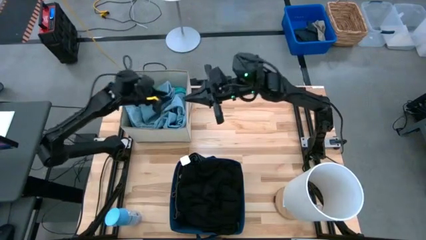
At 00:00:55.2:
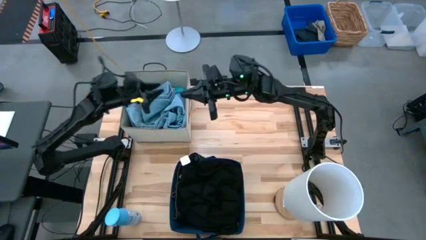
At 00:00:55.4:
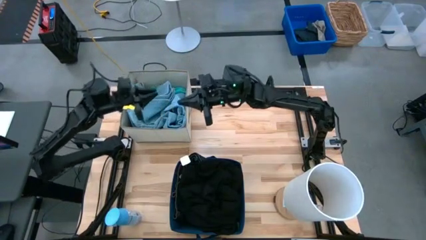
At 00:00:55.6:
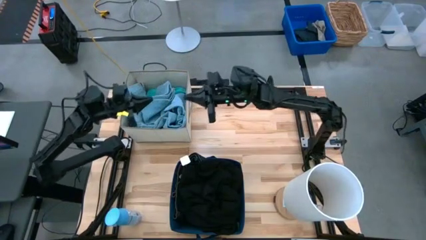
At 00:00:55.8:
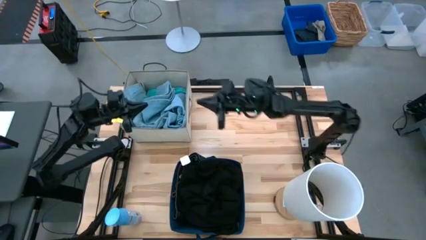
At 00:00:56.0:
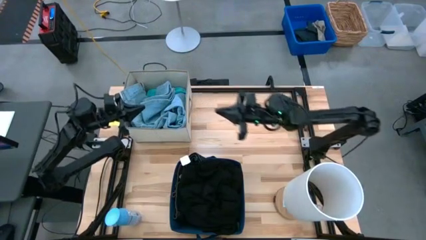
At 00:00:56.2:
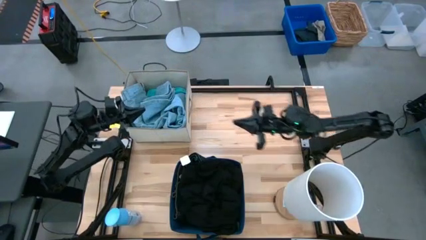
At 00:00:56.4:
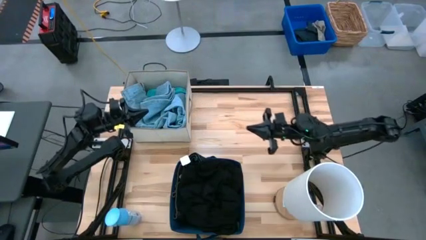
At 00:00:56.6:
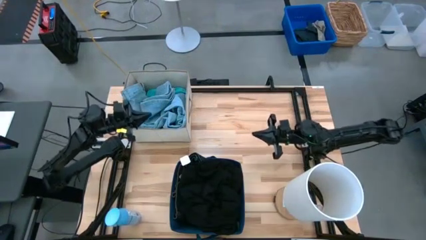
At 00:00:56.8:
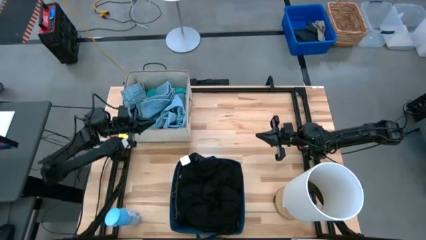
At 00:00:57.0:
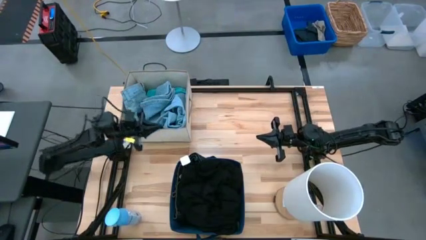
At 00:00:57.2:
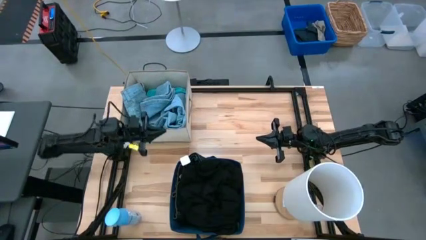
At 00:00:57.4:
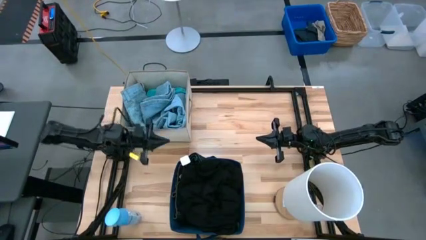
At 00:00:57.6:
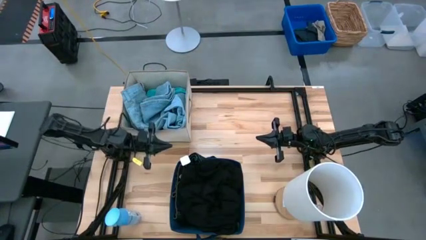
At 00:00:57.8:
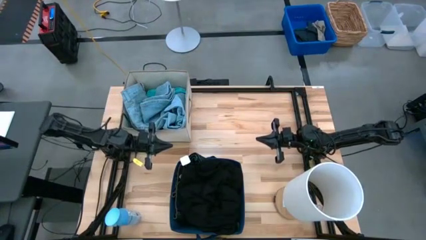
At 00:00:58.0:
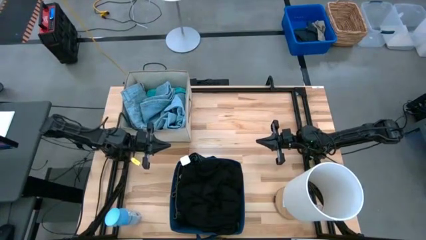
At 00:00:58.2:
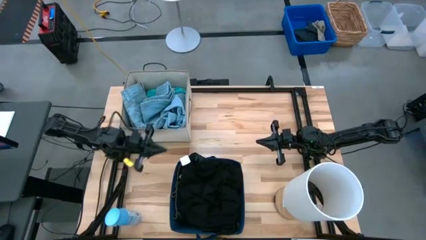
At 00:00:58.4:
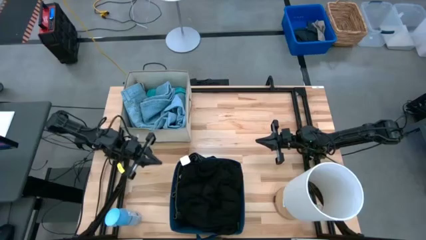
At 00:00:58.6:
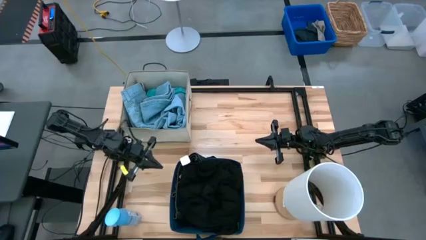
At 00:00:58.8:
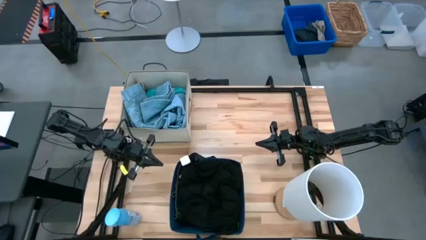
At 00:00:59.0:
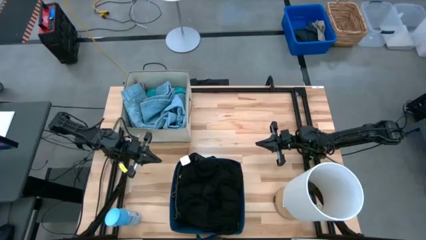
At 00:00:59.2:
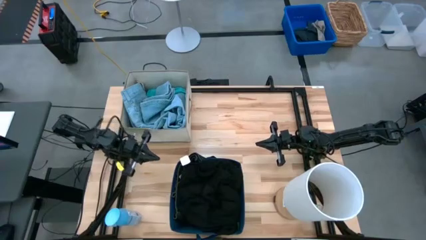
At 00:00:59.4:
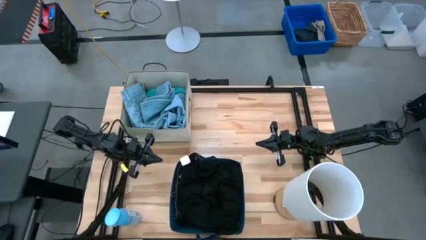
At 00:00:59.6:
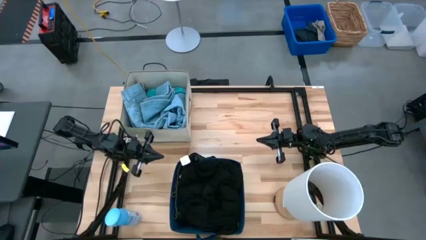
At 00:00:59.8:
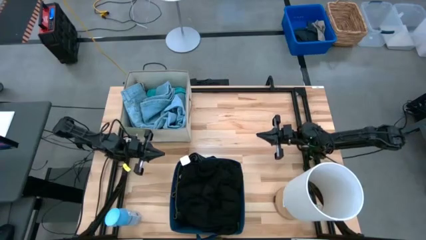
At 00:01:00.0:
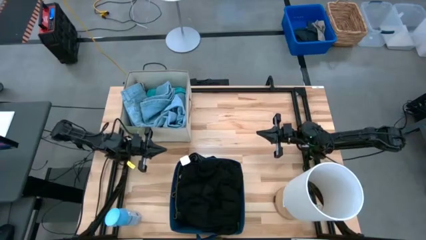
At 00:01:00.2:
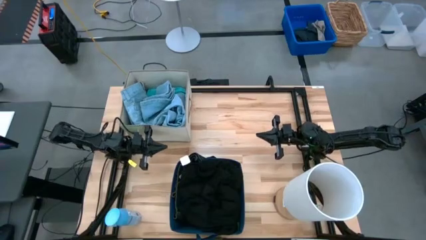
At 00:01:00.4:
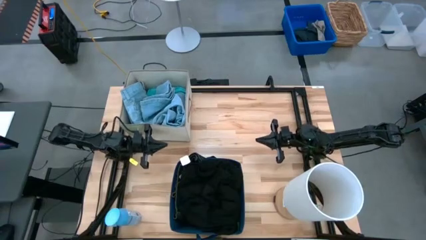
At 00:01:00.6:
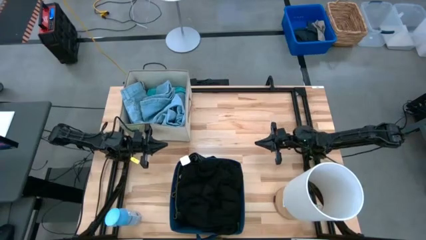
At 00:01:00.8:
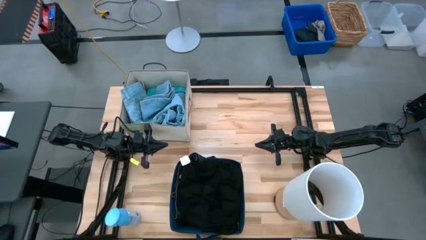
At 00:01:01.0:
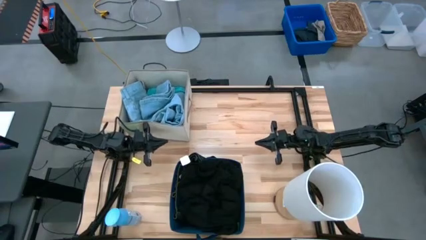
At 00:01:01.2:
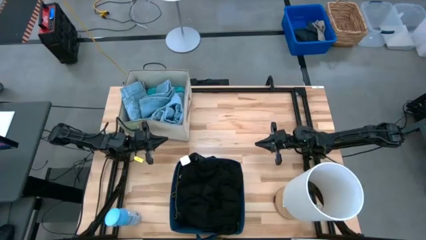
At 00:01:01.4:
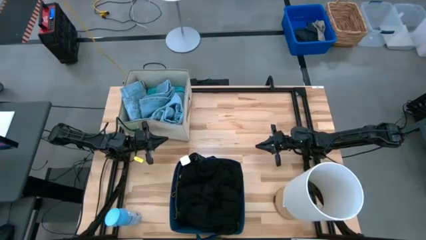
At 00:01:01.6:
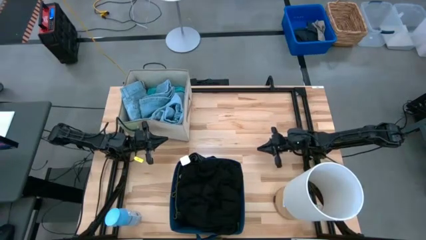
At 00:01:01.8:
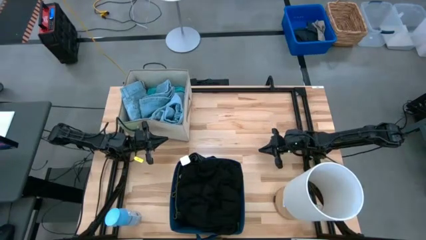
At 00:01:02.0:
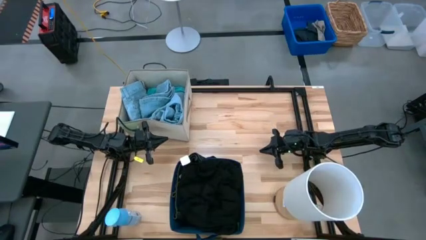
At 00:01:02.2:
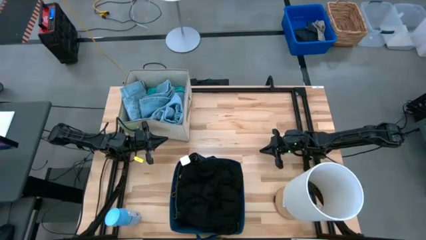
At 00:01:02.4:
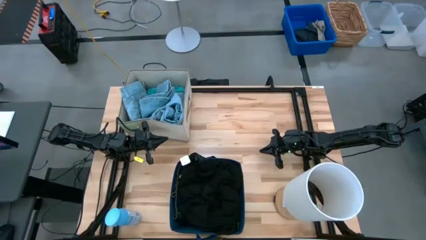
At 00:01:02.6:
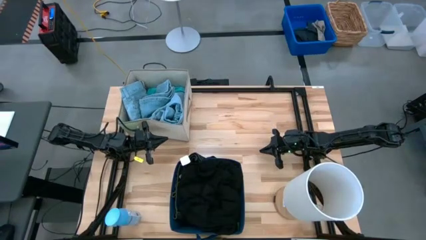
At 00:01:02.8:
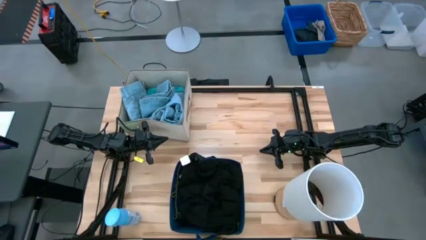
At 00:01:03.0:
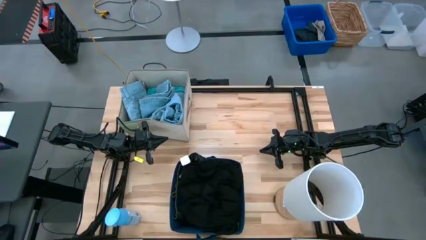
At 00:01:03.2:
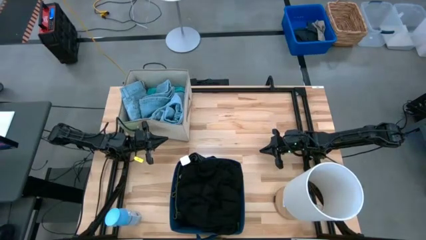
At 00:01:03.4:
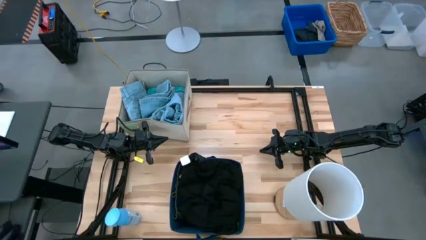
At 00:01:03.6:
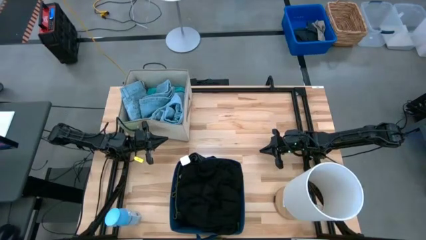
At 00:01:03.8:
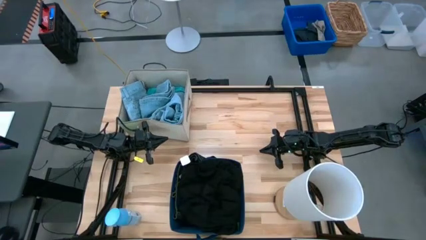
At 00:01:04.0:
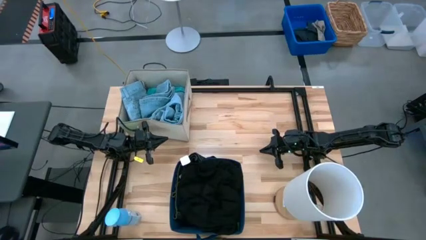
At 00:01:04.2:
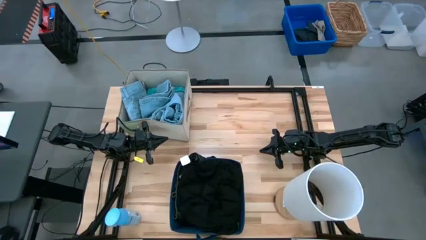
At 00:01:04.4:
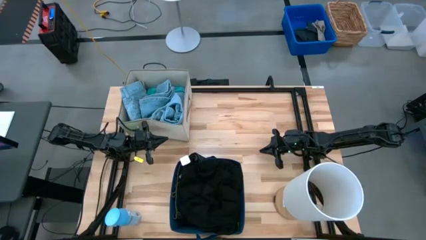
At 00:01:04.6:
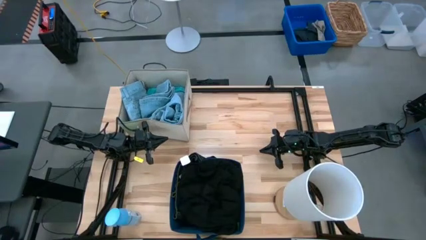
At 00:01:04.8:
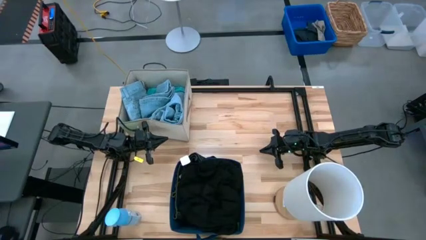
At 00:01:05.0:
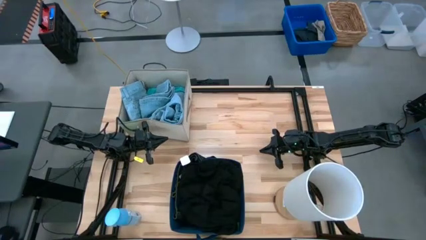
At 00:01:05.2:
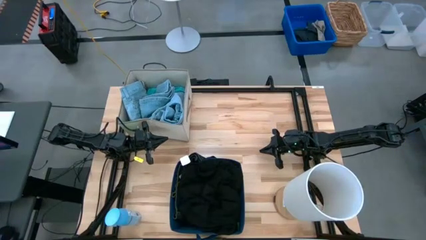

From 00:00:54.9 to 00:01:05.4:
Task: Sort clothes
Return to Home Position

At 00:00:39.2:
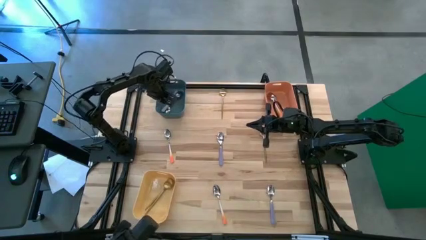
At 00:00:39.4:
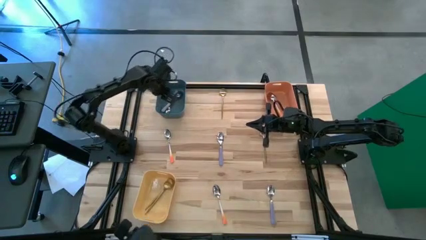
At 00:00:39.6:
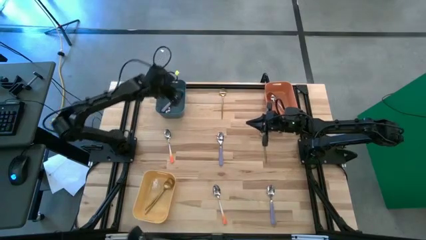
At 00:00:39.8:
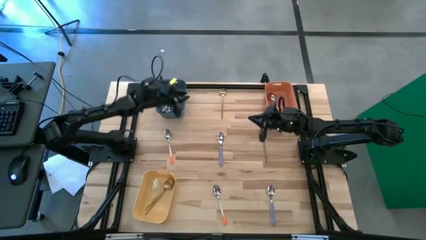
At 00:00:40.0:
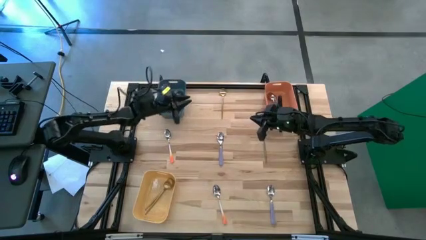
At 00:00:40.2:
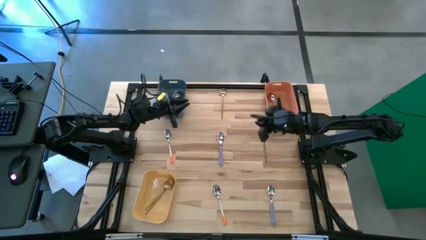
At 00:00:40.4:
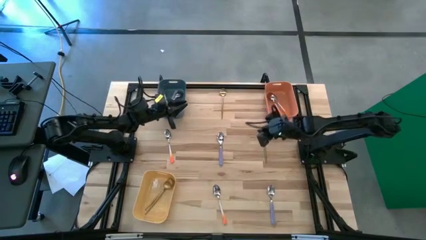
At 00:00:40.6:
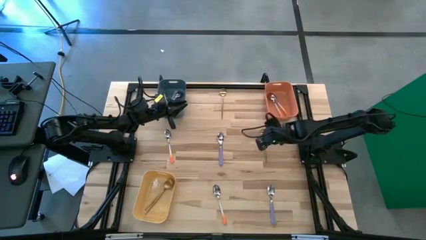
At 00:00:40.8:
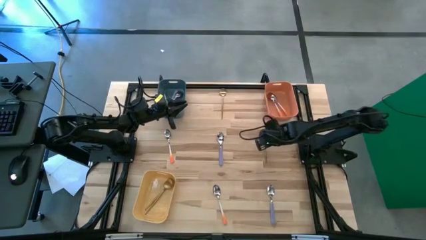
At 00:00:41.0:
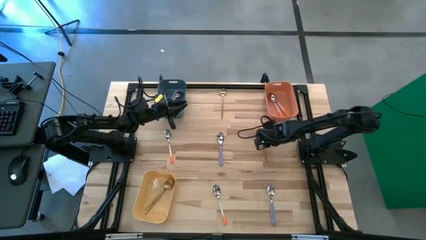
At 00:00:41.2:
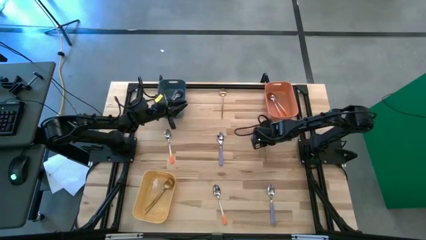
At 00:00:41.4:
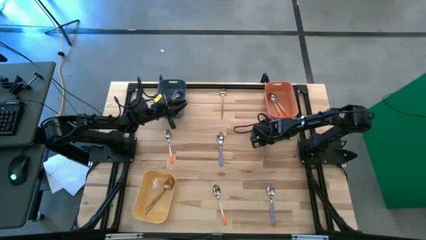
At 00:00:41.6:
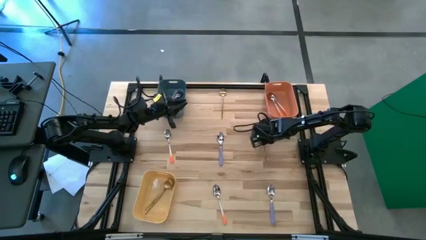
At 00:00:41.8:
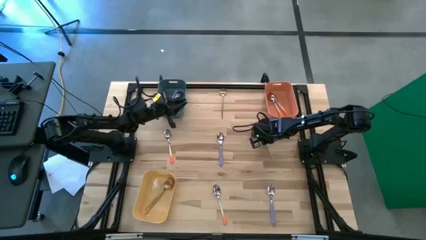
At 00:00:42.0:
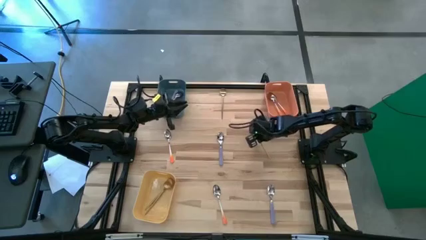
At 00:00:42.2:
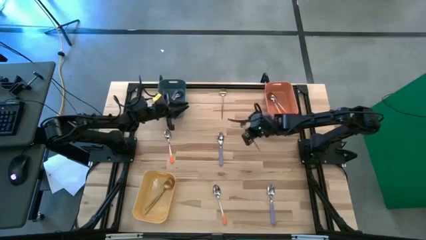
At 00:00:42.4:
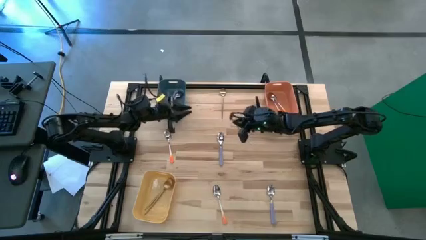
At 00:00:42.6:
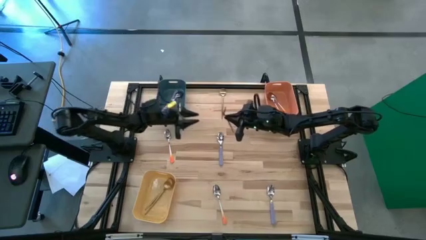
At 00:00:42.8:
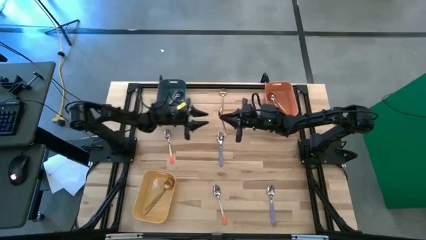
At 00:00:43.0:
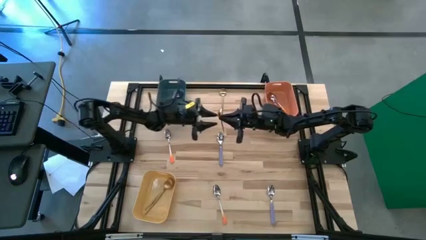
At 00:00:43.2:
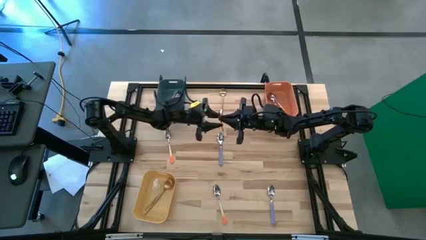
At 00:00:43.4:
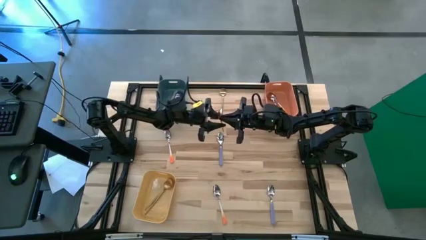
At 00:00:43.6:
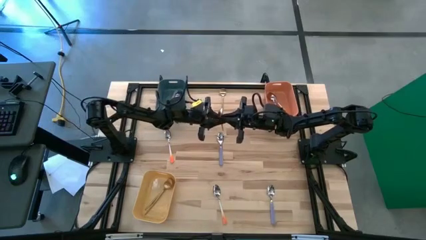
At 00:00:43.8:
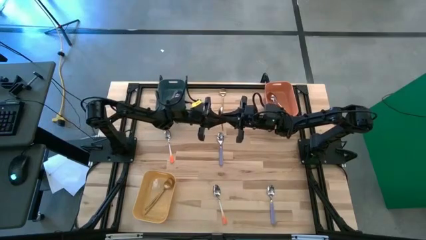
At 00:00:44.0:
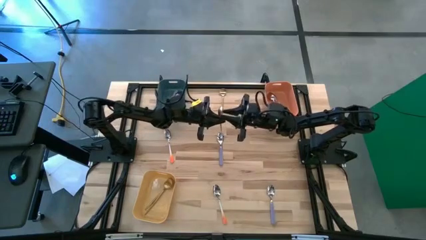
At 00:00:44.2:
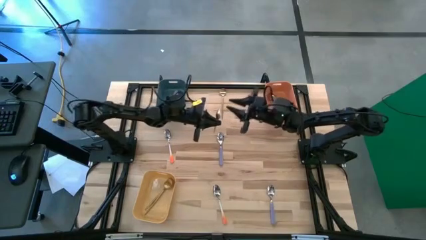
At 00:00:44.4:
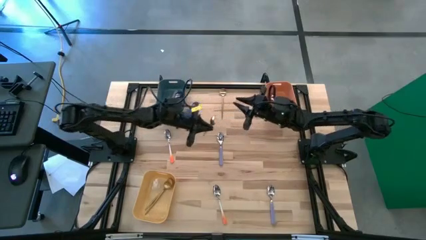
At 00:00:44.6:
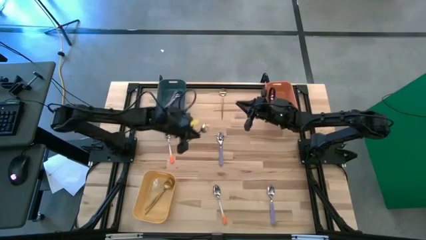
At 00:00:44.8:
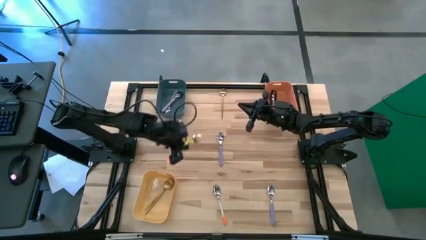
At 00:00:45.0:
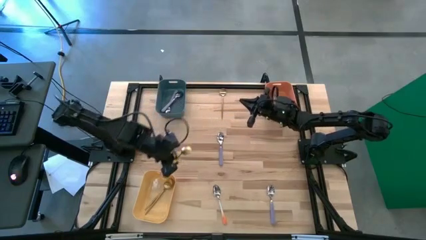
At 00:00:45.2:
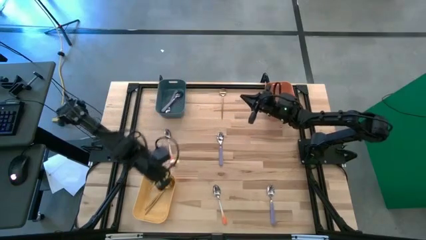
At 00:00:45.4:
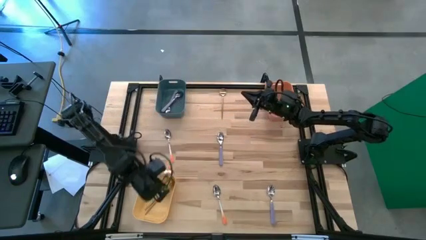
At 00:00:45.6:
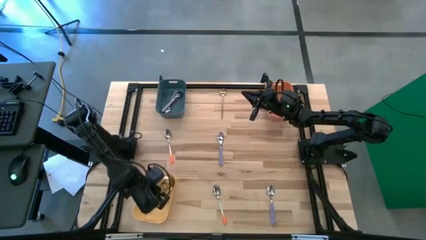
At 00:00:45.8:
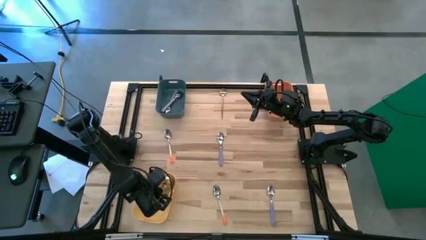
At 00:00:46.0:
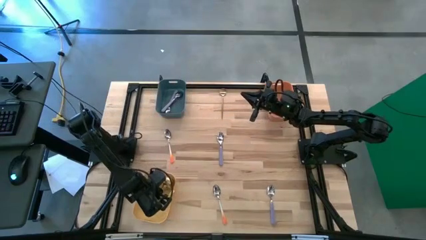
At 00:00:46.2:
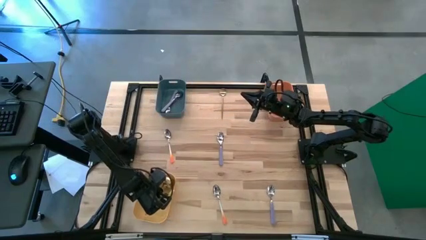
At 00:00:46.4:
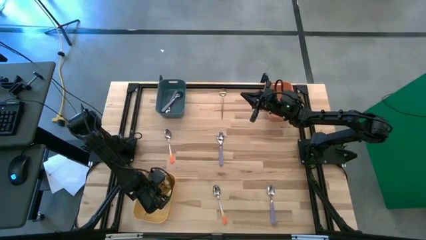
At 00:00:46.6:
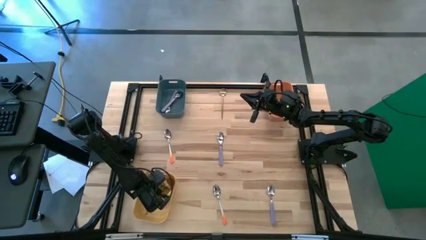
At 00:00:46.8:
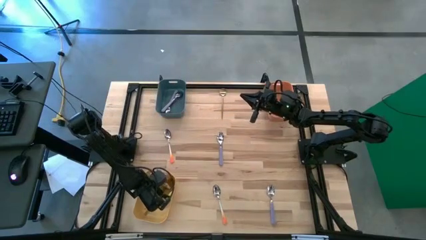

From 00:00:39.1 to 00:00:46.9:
Task: Sort silverware by color (type)
Put the bottom gold spoon into the yellow bin
